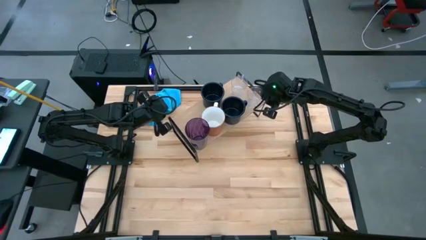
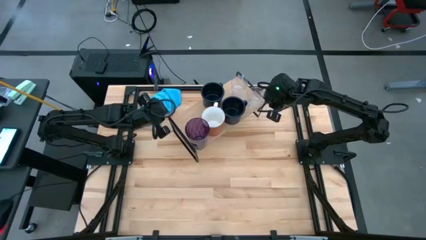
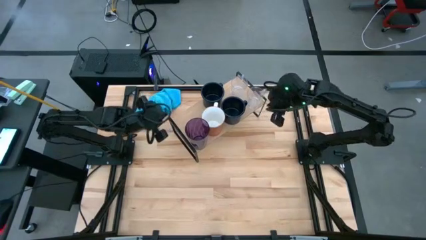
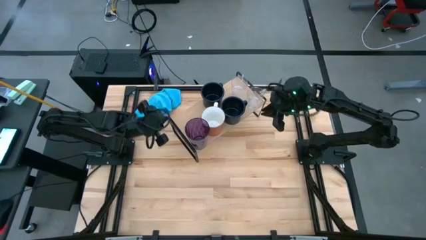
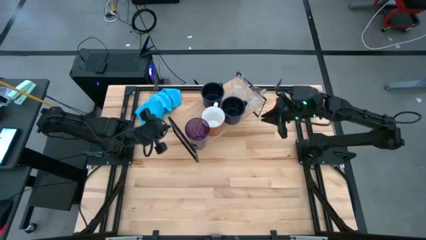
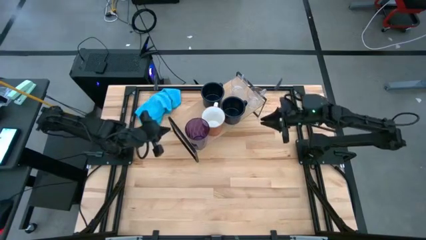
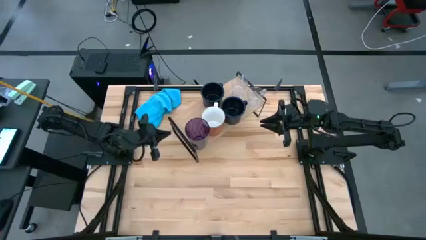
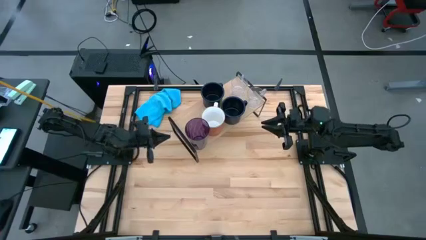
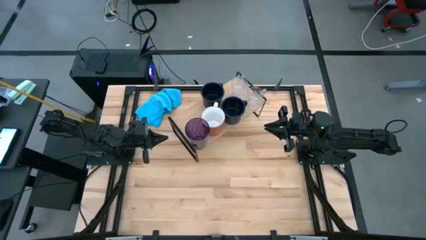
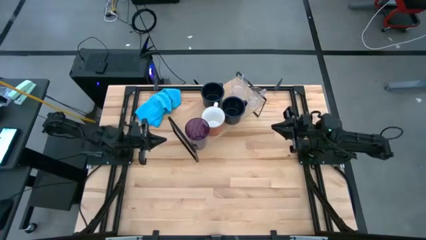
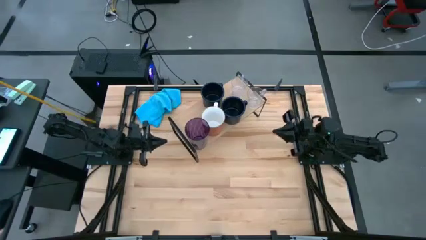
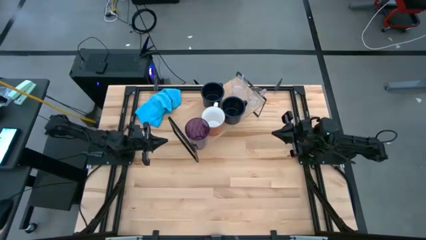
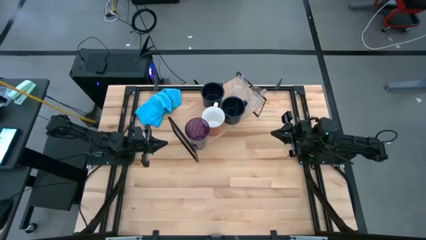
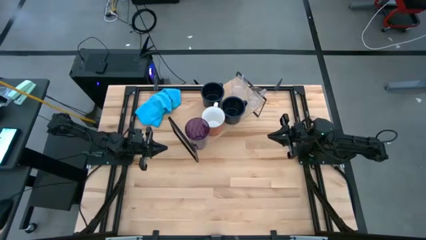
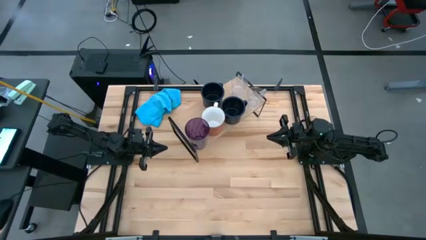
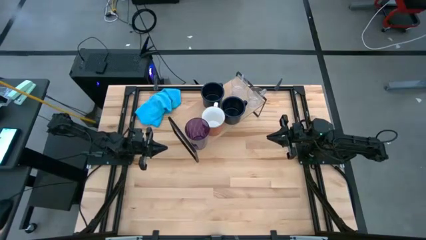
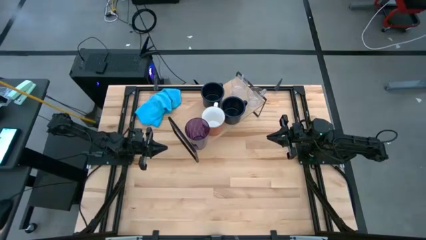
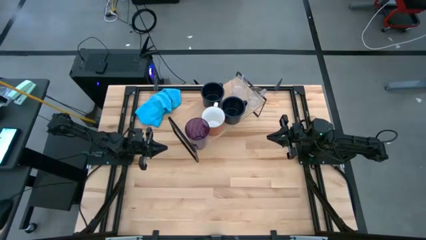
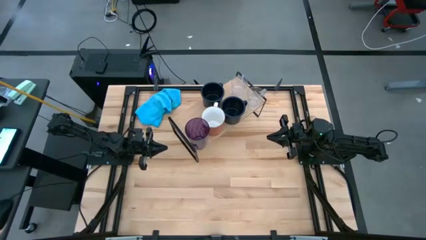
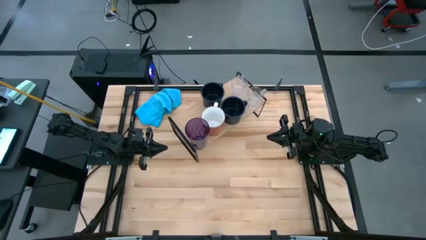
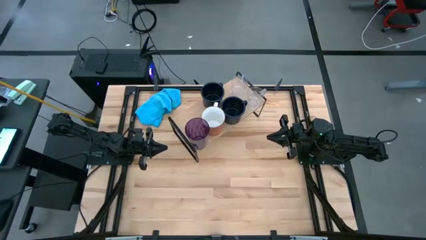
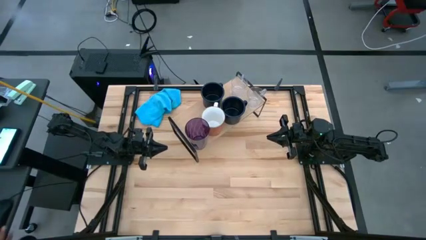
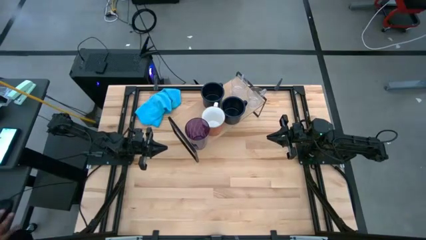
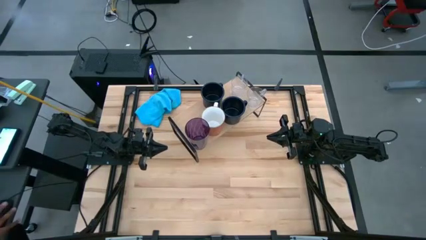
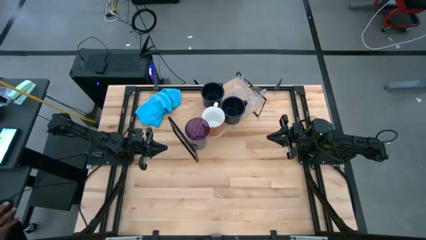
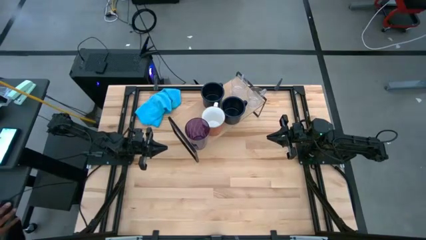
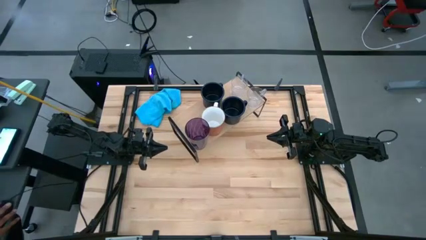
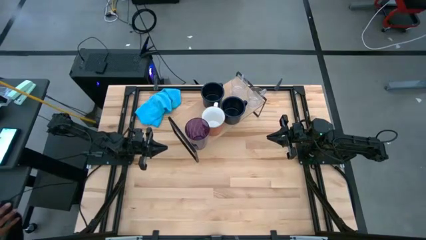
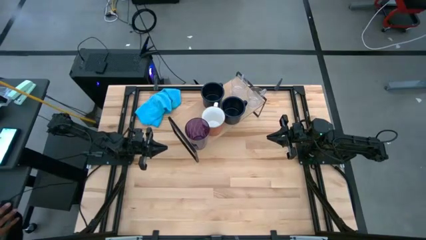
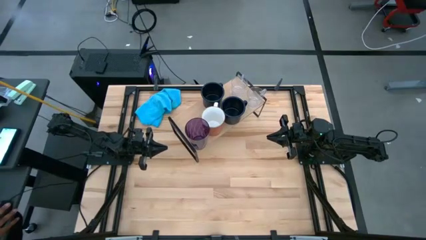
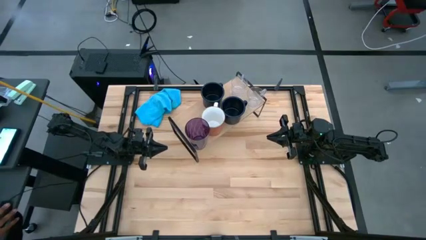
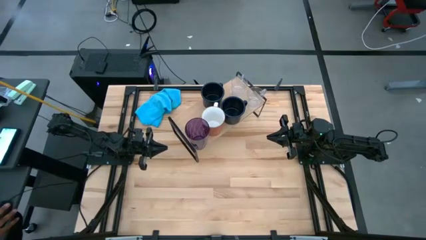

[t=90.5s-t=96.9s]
Task: Stack small to large cups/mugs on shelf
Return to Home Position

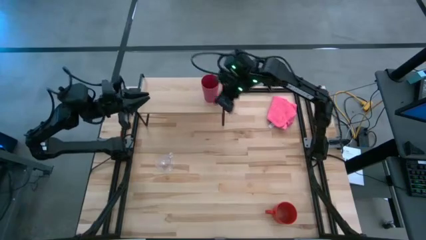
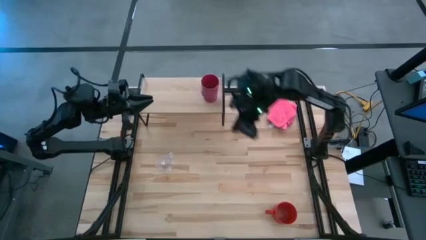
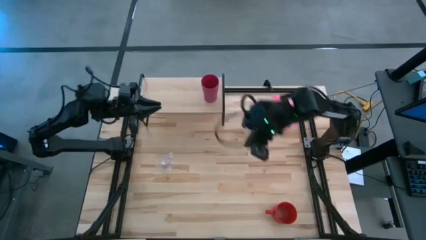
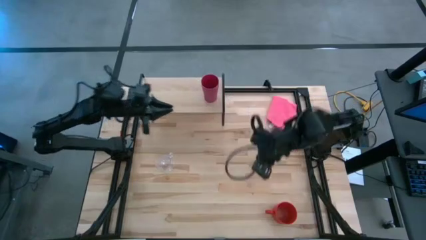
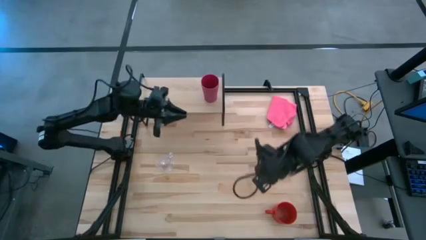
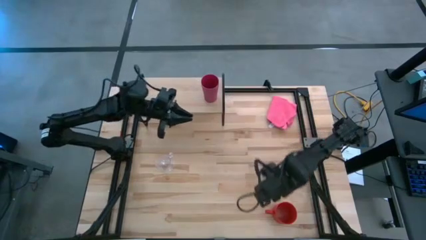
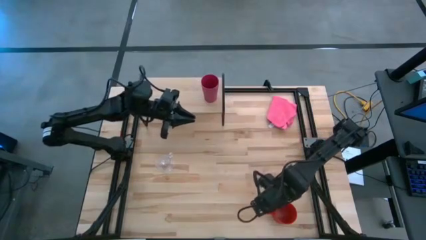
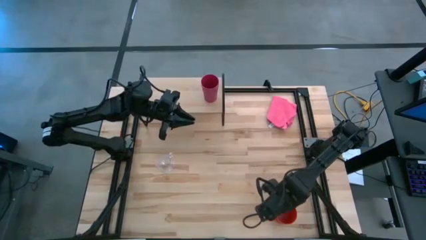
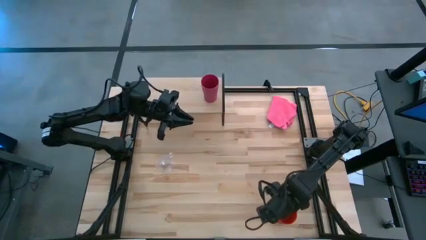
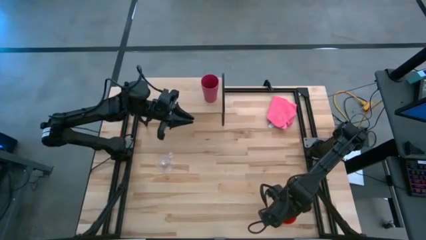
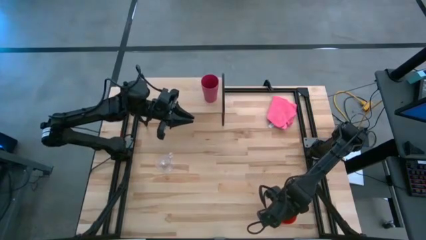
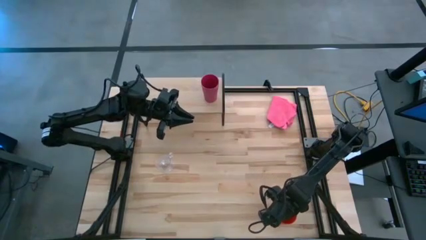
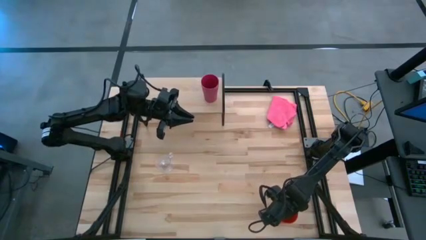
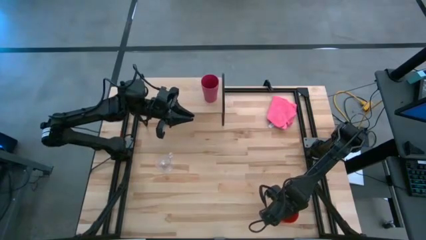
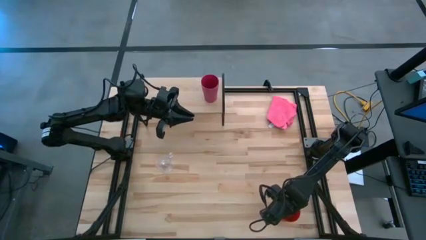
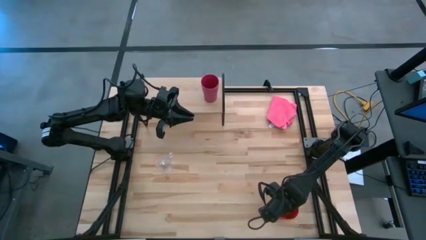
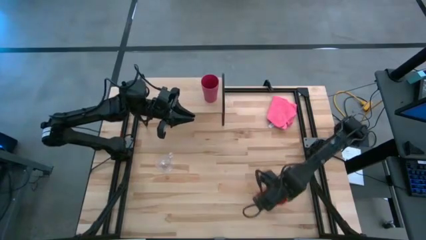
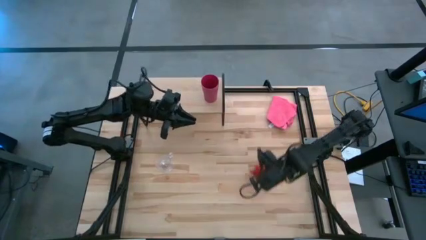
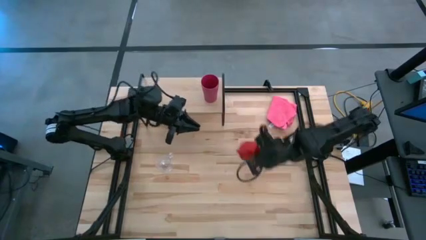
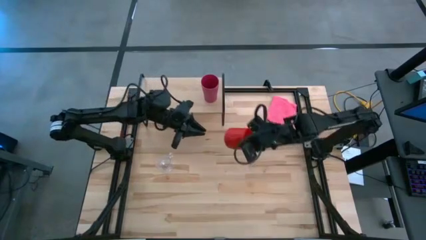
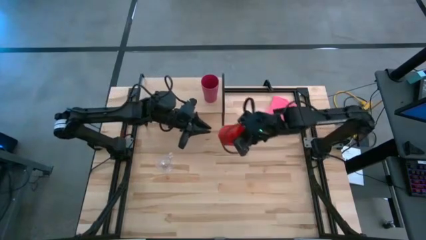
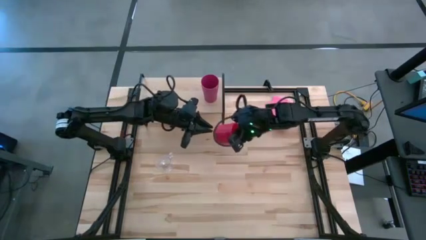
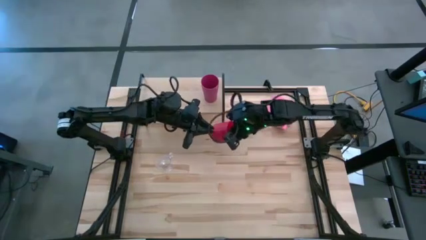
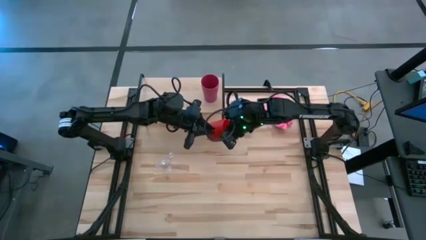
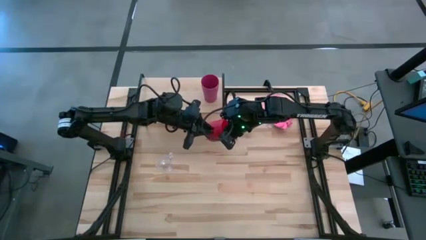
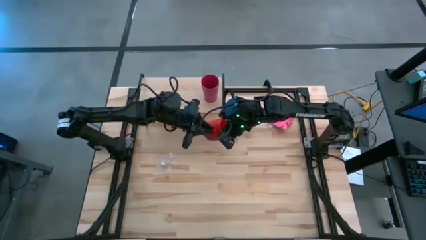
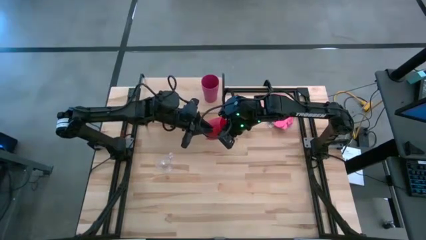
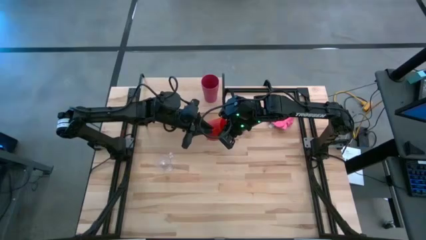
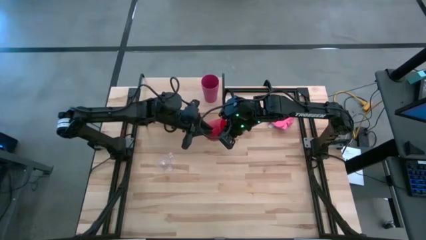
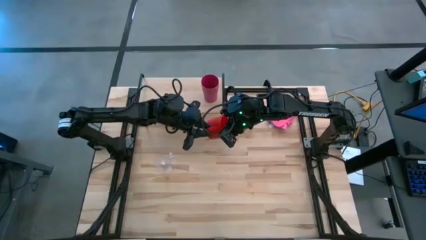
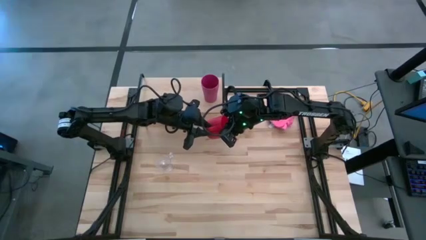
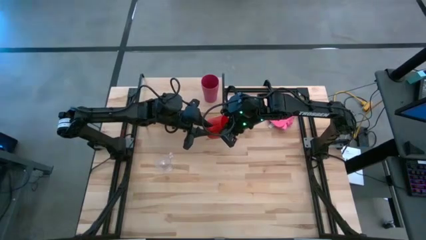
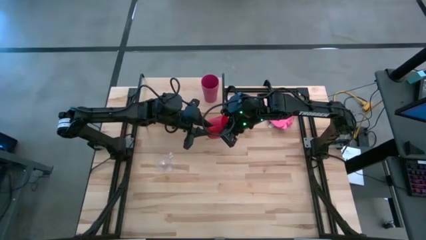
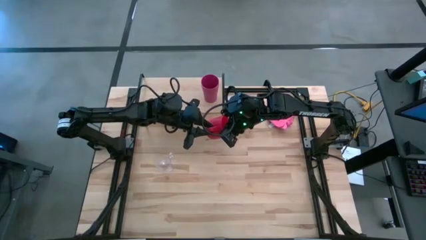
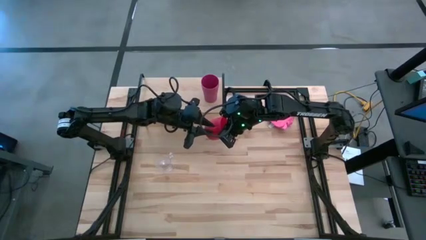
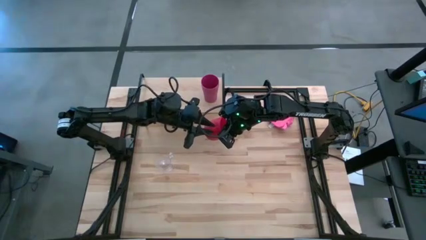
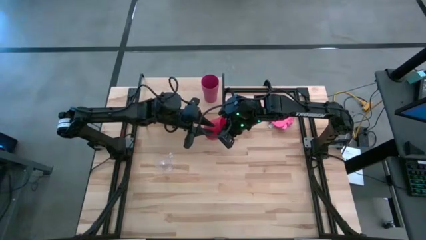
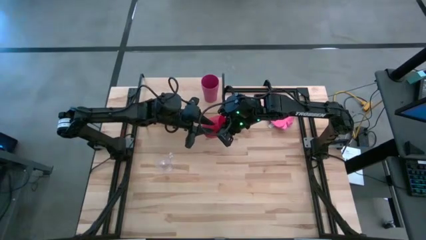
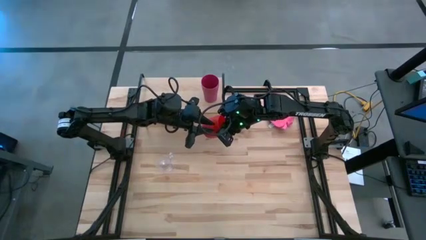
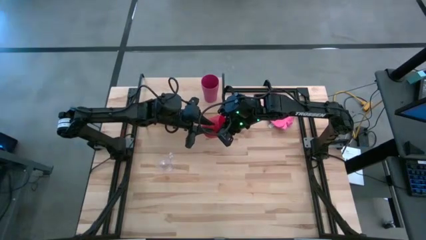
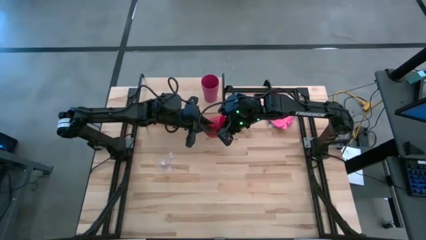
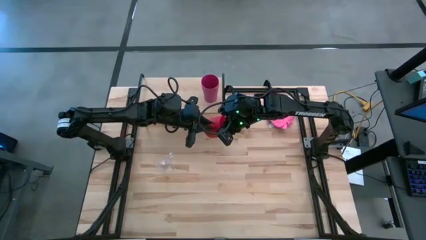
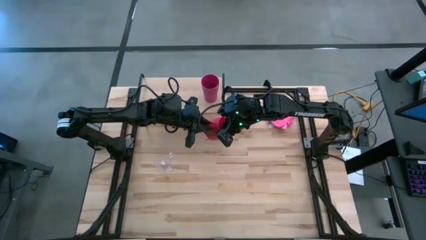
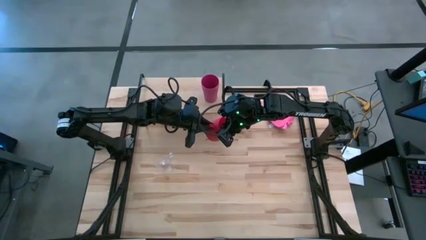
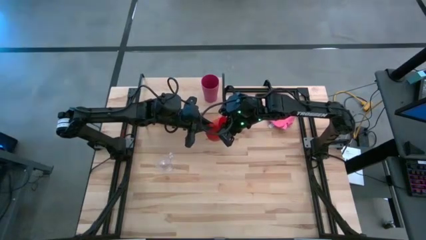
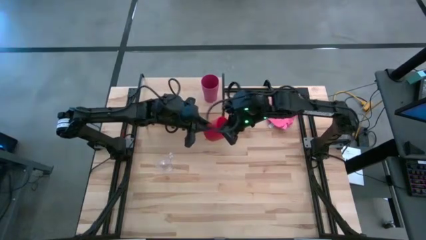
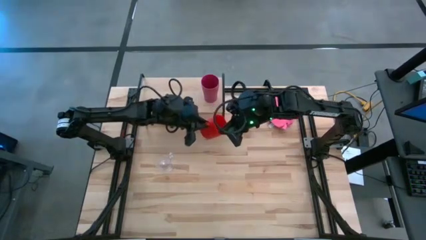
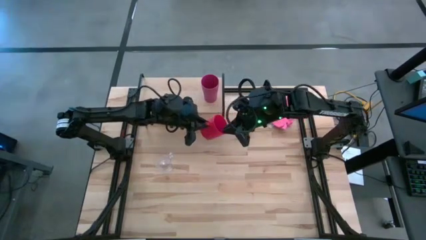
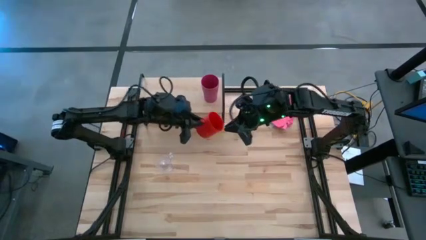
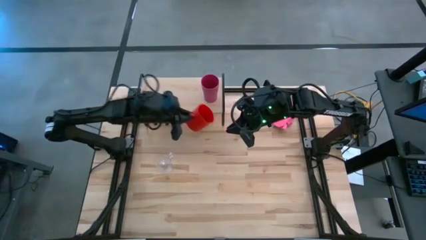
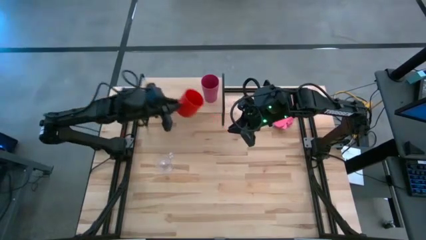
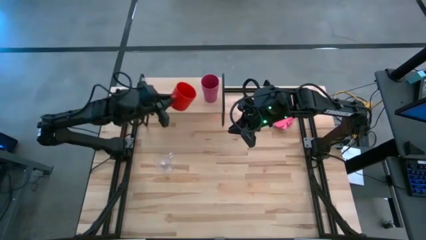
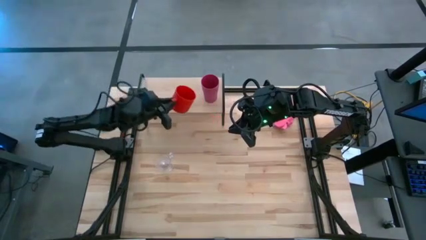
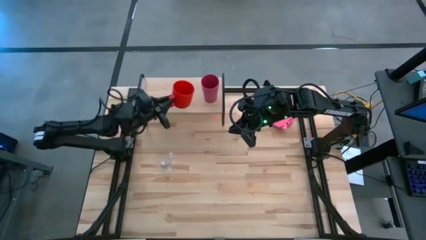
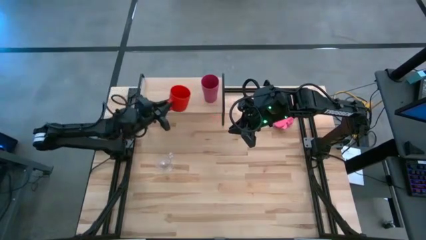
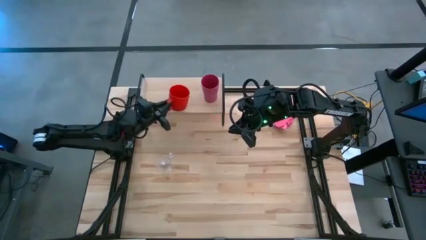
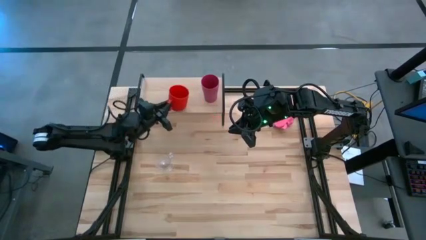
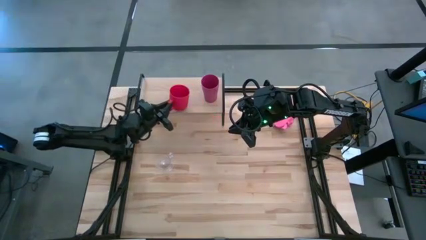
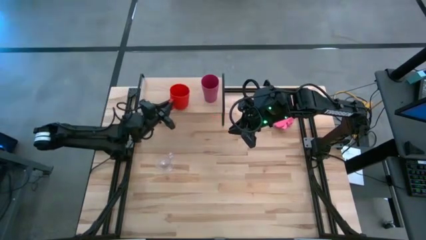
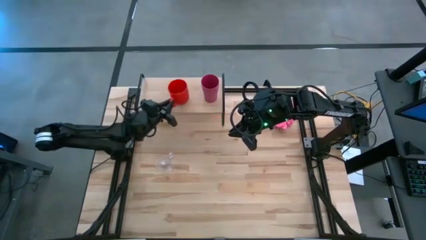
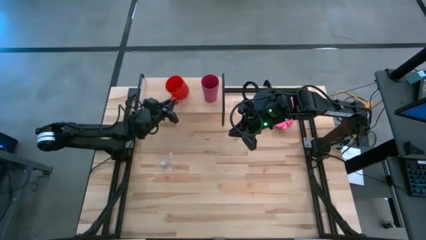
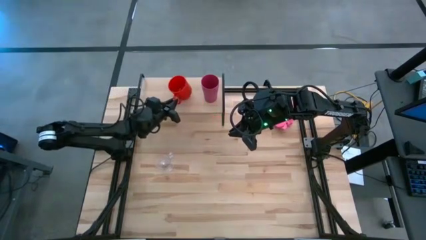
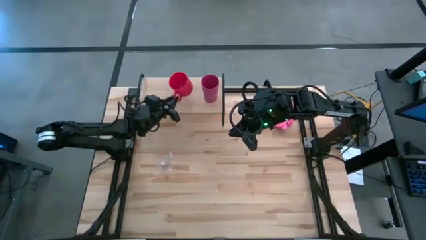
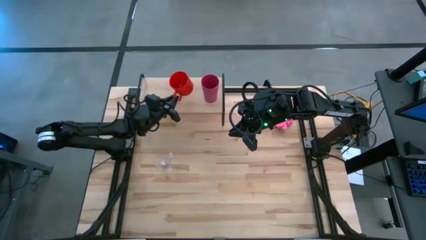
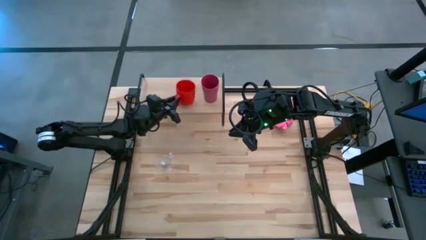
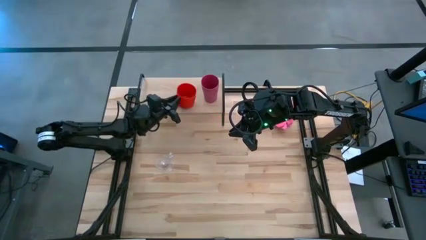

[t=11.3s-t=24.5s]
Task: Stack small to large cups/mugs on shelf
Put the orange mug on the shelf
